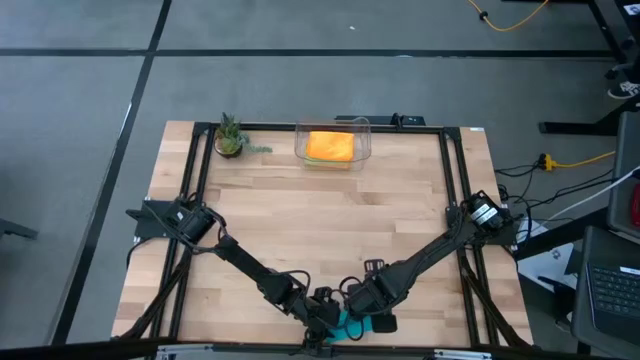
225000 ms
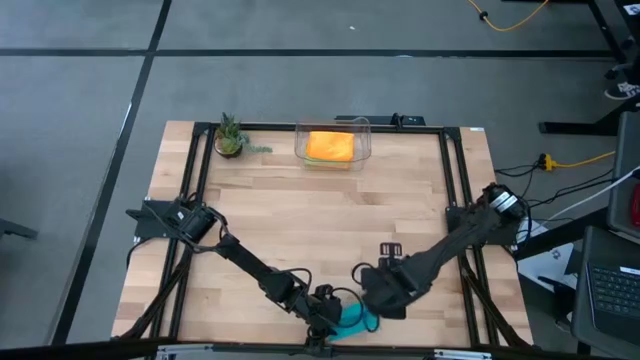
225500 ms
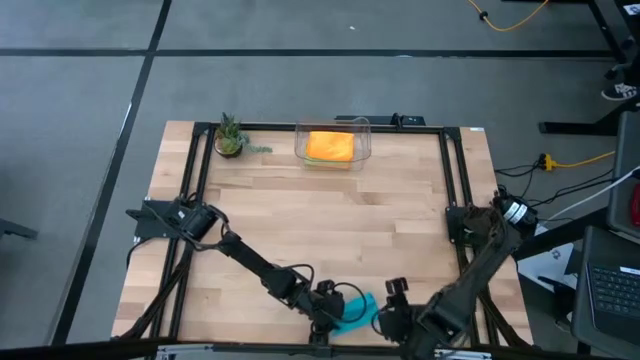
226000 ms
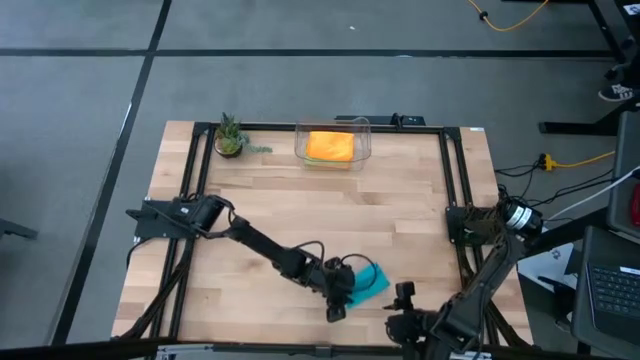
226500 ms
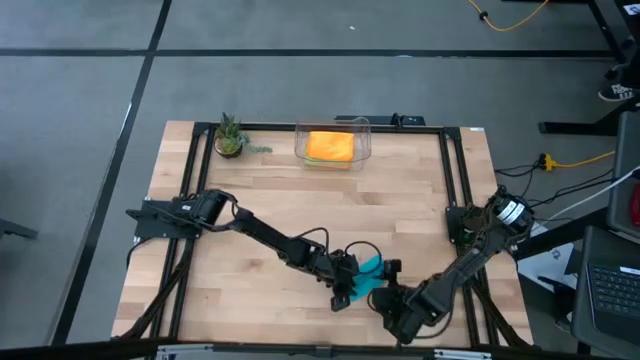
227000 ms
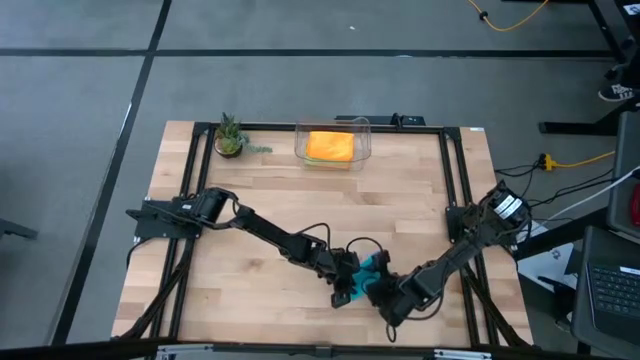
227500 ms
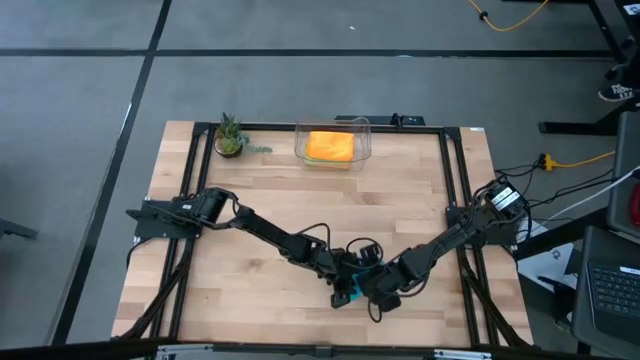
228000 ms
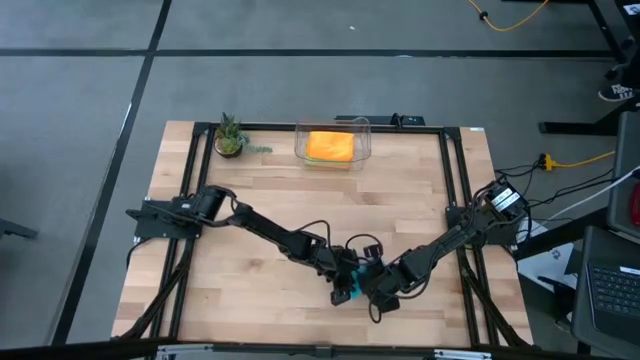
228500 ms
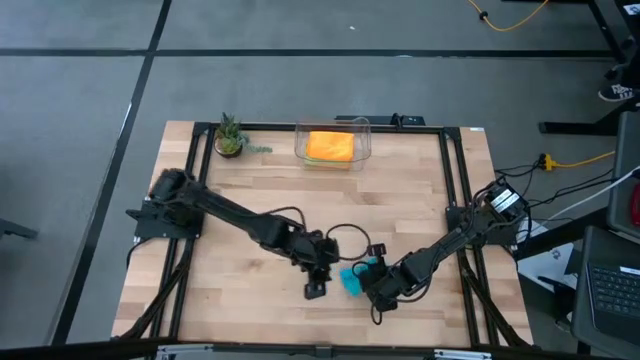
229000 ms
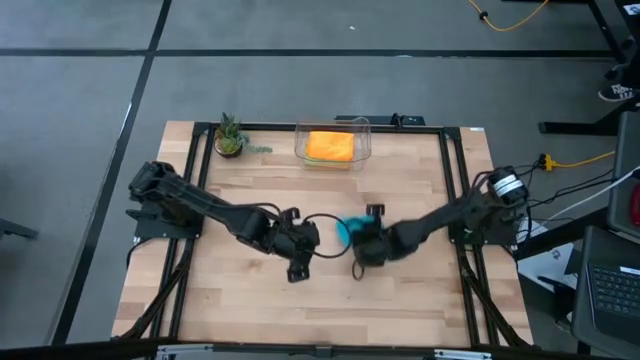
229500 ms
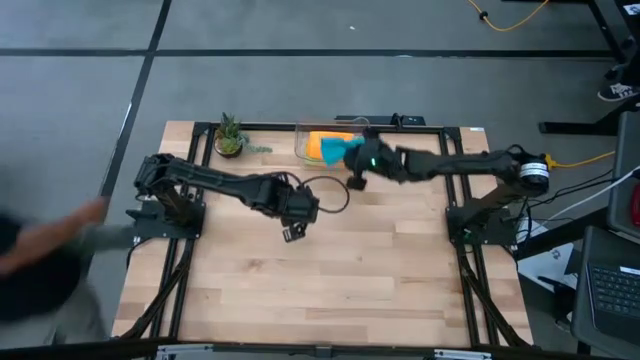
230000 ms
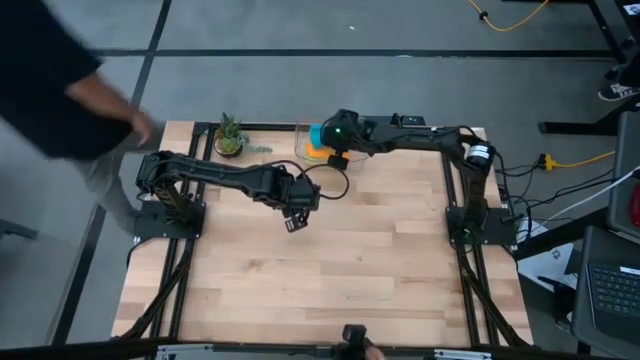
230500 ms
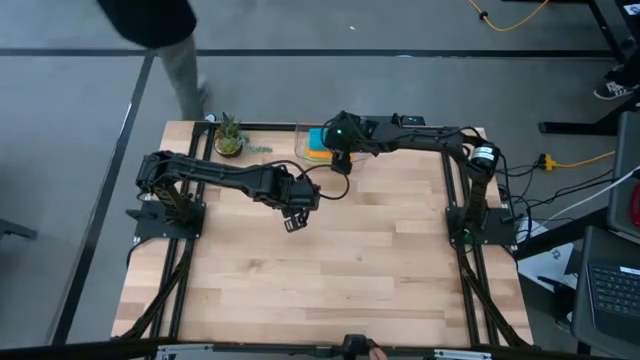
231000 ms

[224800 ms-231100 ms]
Task: Fold microfiber towels
Put the folded blue microfiber cloth into the transparent bin

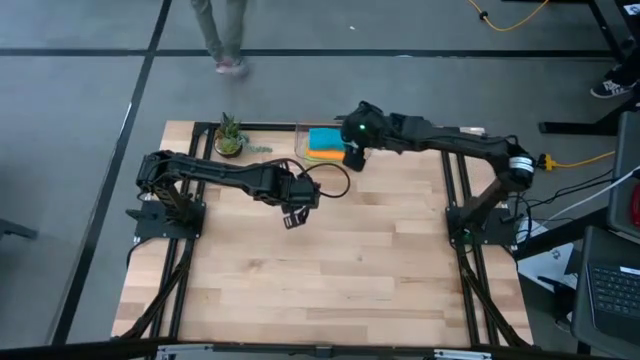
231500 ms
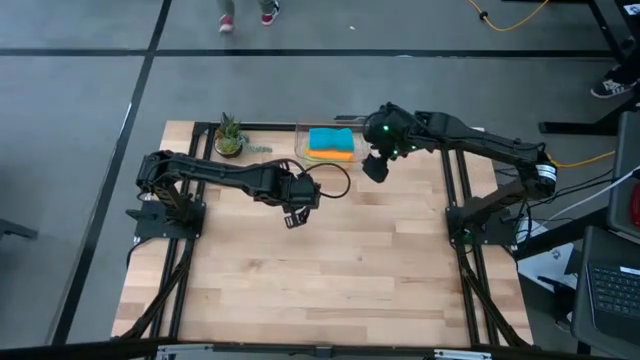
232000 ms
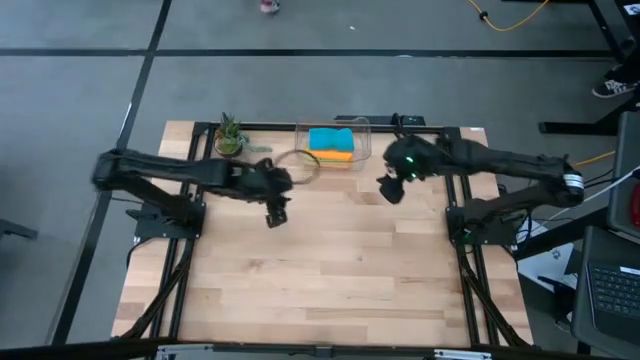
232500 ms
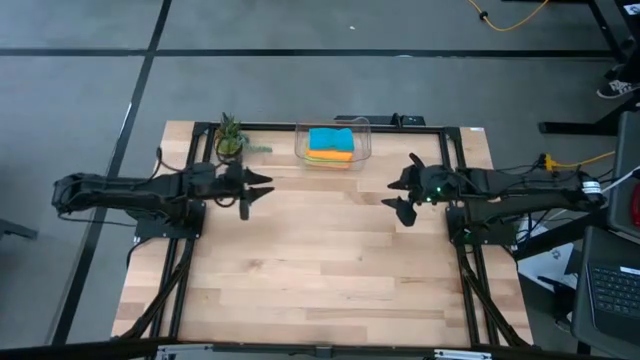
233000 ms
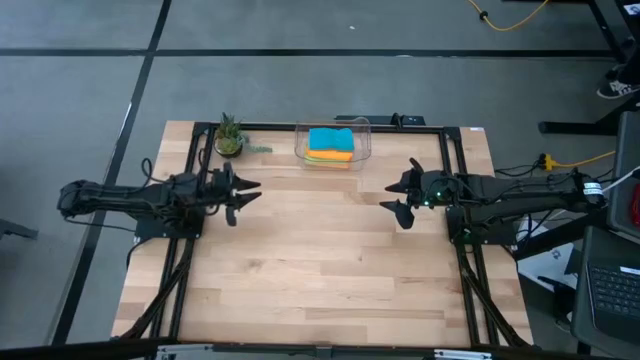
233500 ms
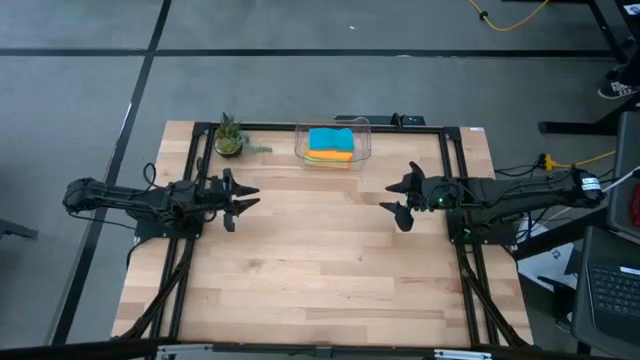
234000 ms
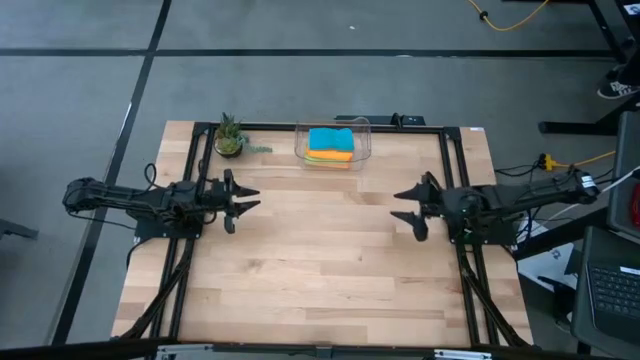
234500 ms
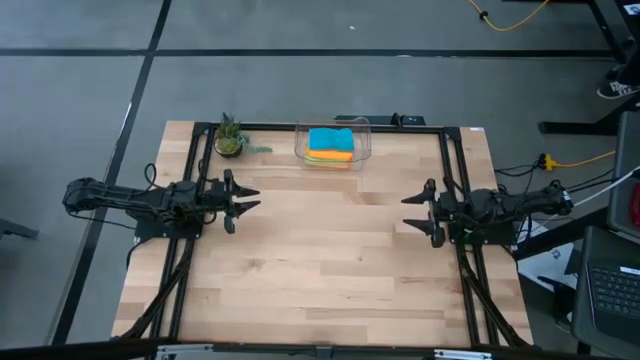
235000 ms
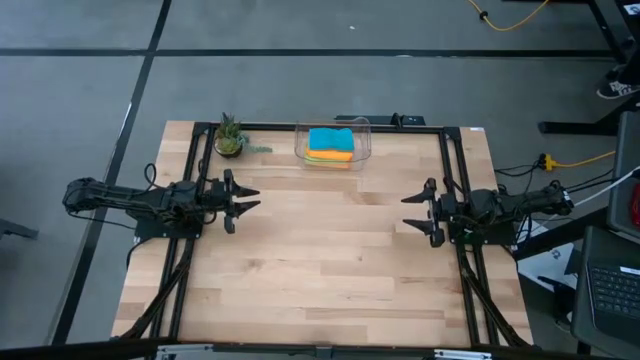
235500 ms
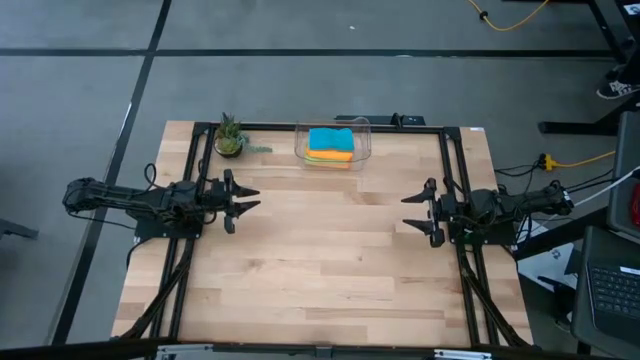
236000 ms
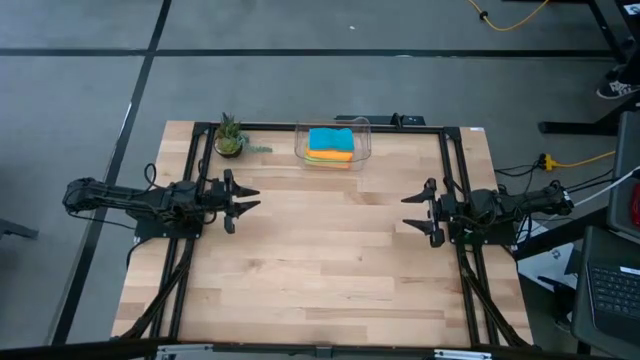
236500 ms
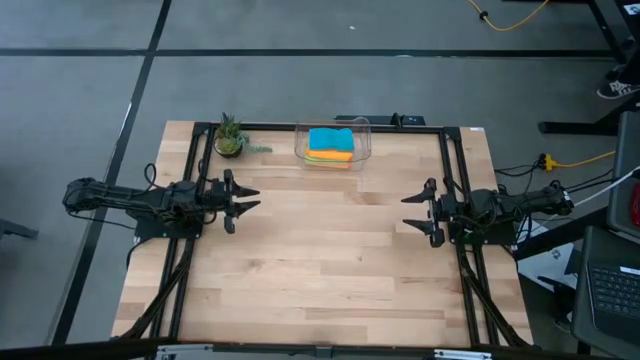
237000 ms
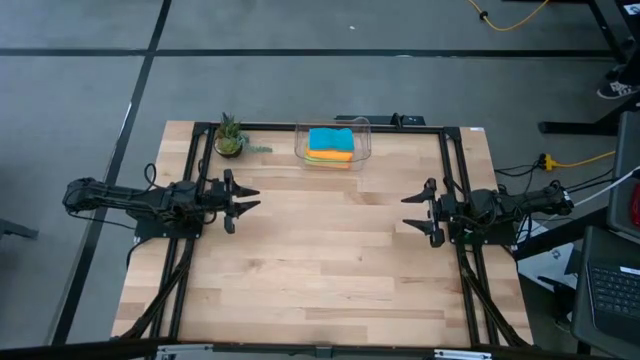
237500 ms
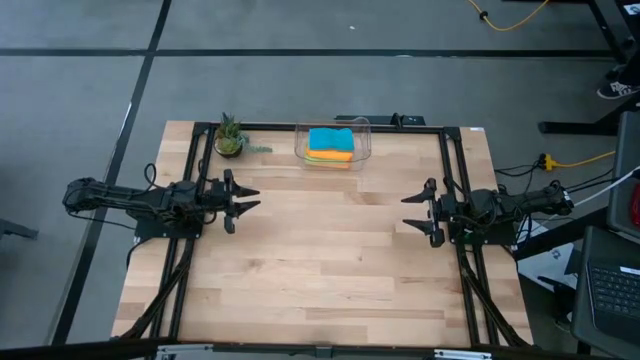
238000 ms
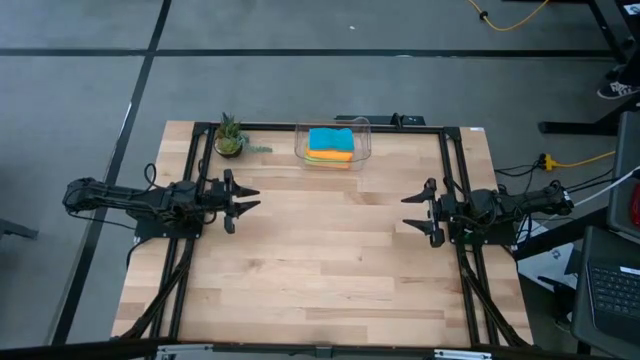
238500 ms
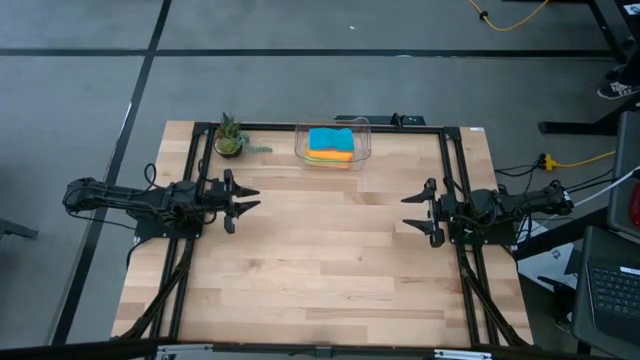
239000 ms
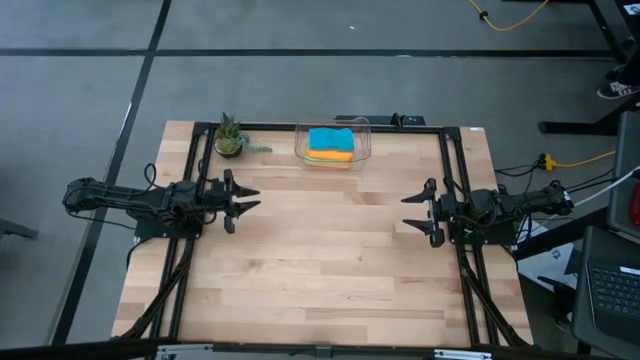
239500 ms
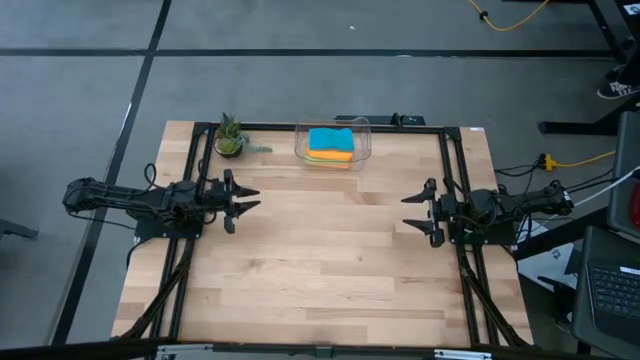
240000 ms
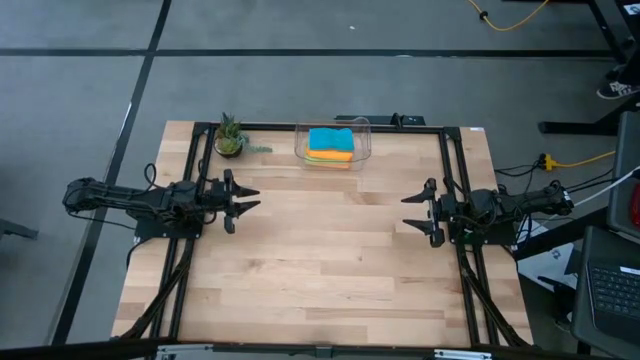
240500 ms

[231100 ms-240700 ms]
Return to Home Position

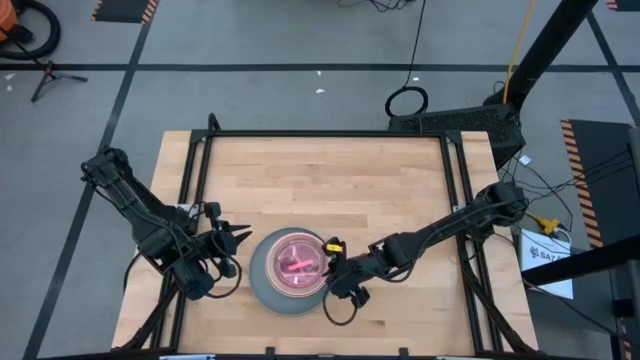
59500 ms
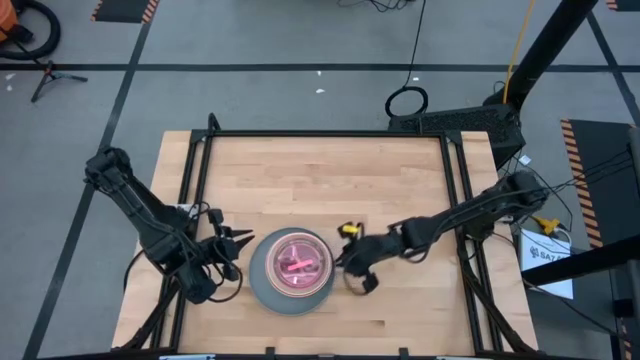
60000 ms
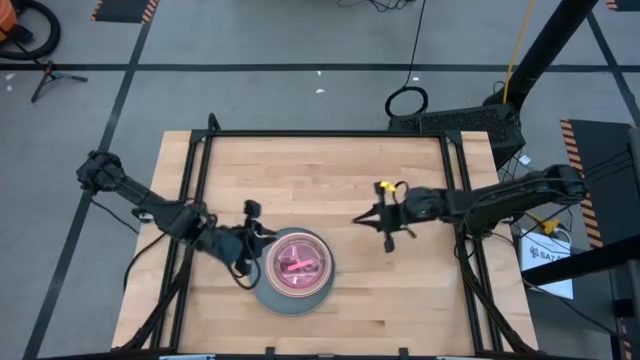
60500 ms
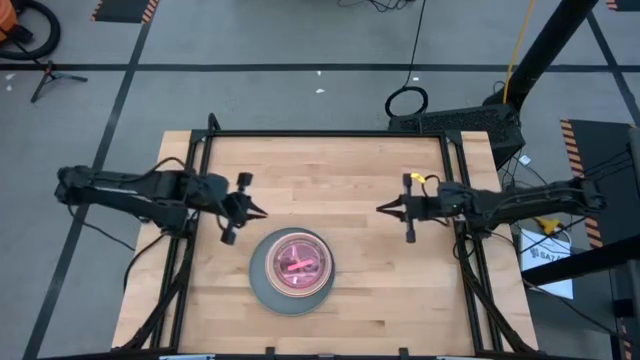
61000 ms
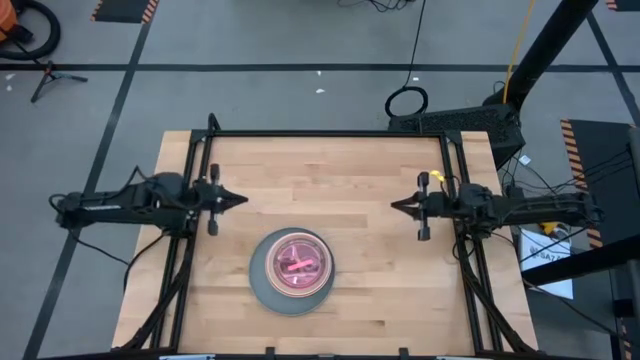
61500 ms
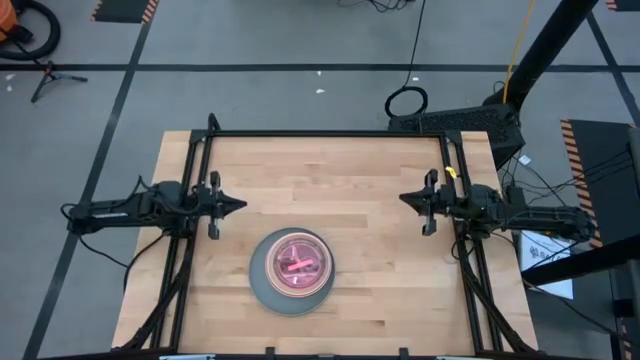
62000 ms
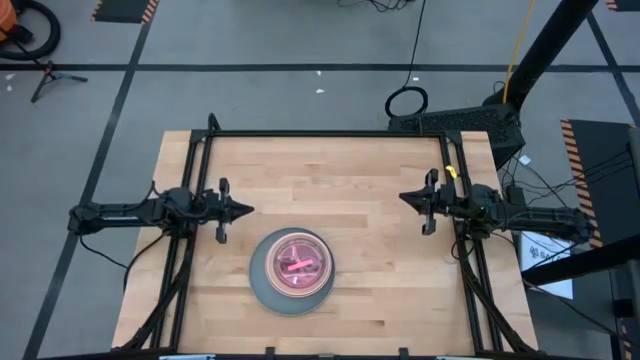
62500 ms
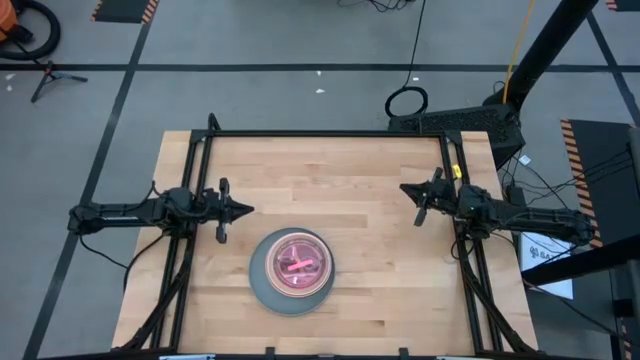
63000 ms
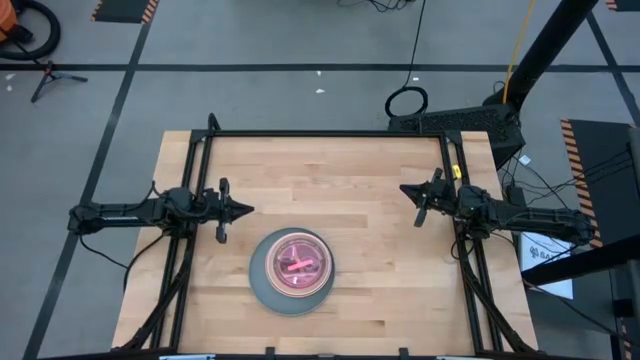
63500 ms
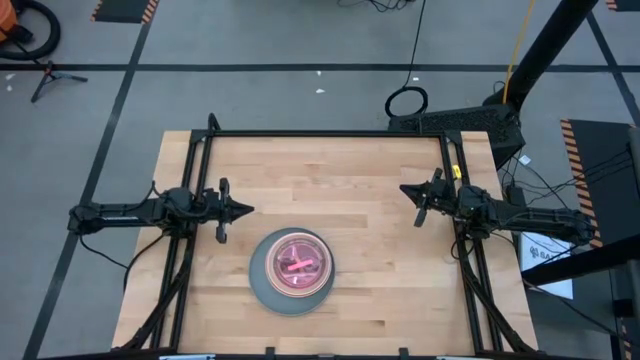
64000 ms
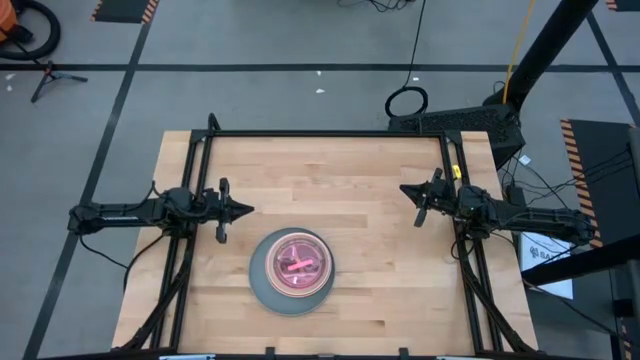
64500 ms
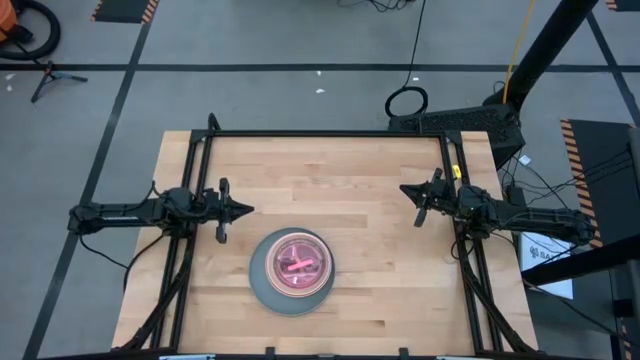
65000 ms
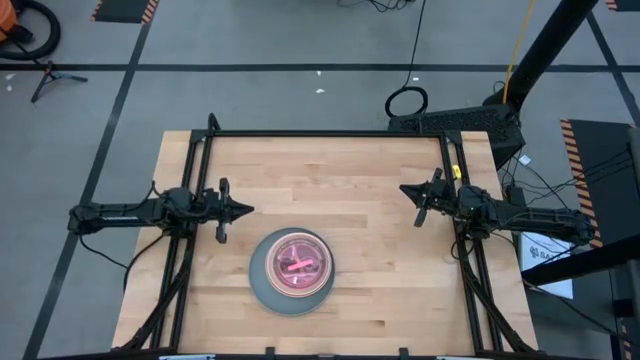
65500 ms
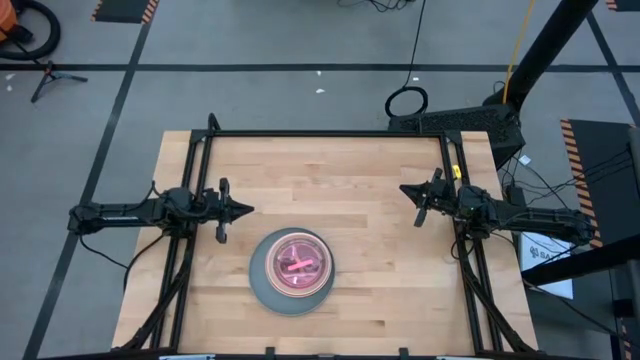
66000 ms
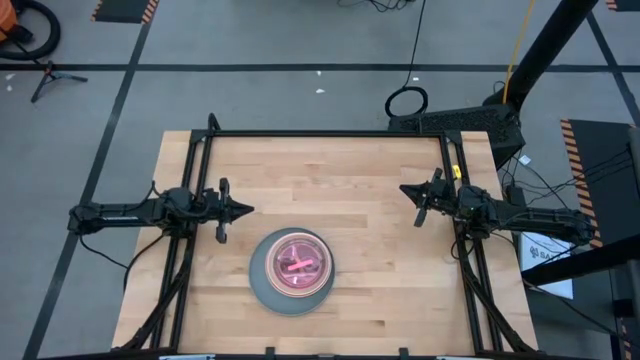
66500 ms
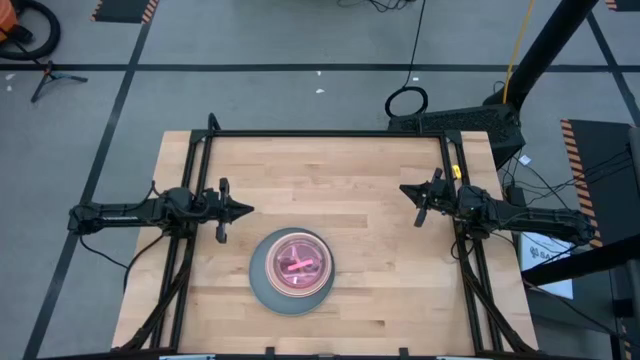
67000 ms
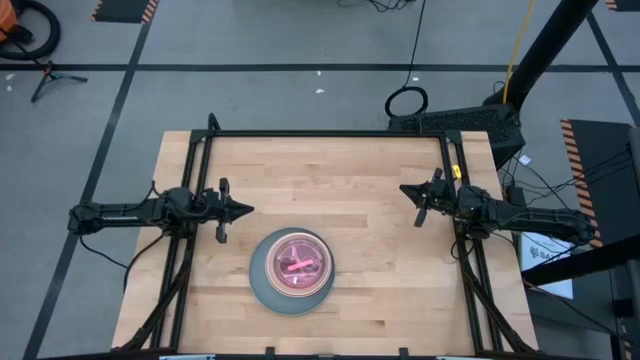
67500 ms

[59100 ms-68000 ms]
Task: Stack plastic plates
Return to Home Position
